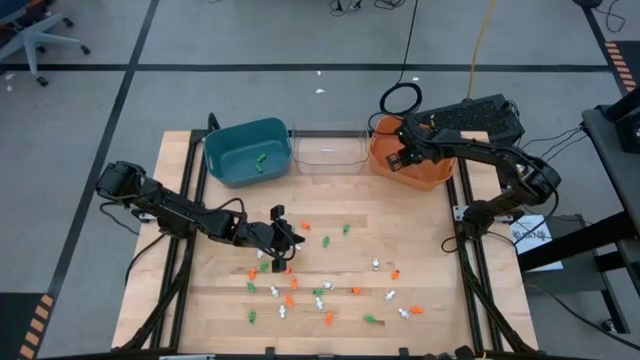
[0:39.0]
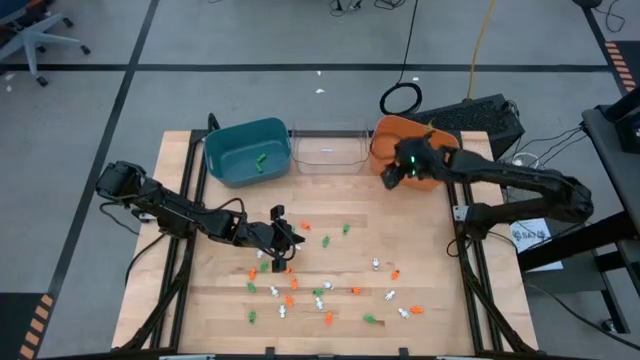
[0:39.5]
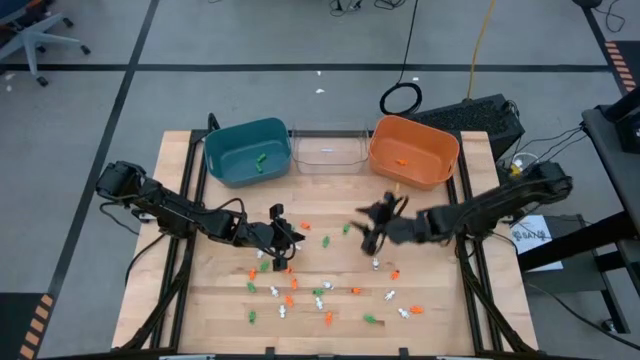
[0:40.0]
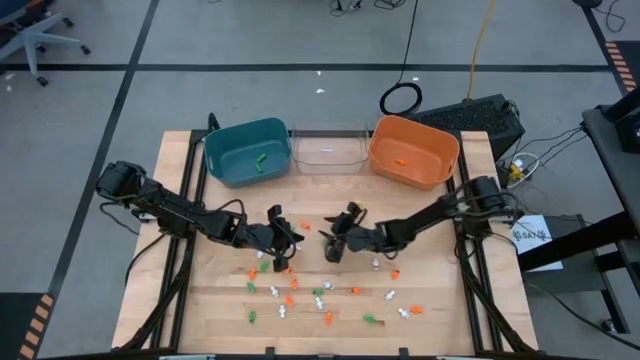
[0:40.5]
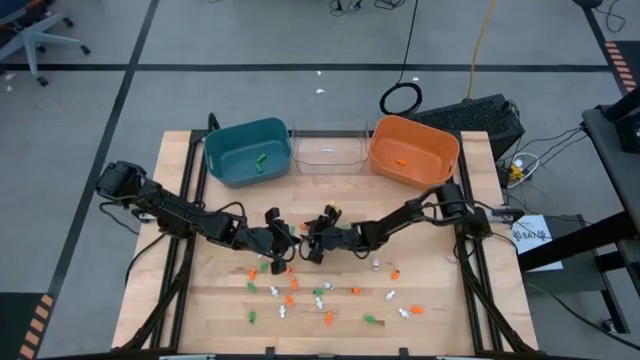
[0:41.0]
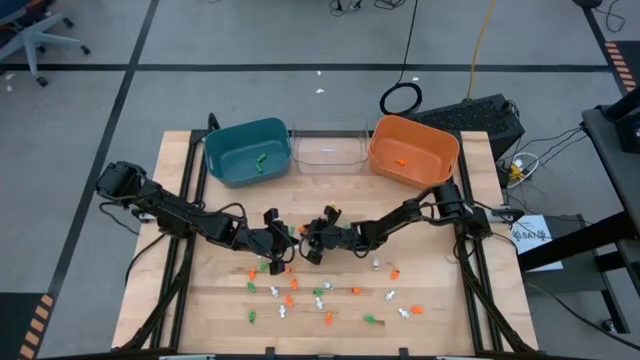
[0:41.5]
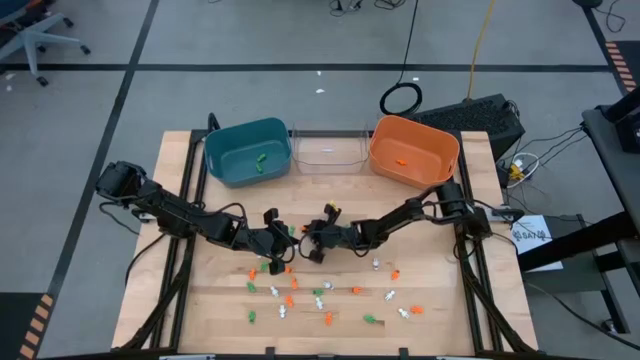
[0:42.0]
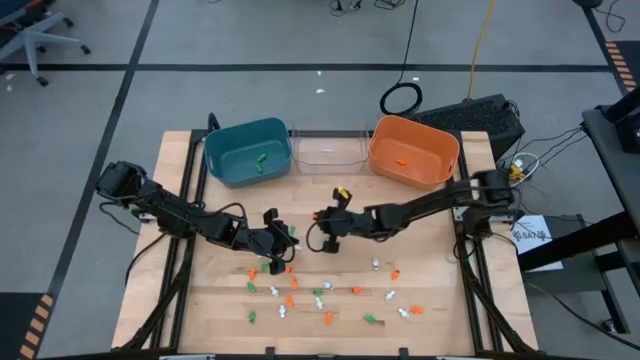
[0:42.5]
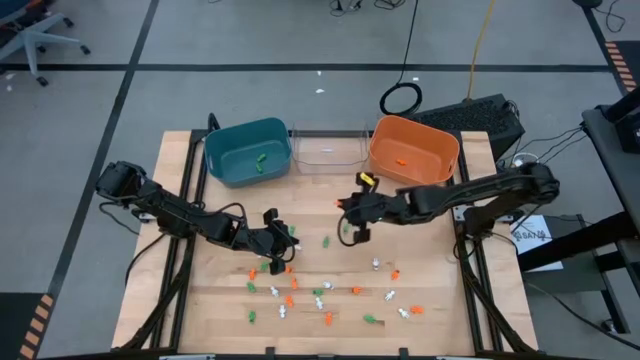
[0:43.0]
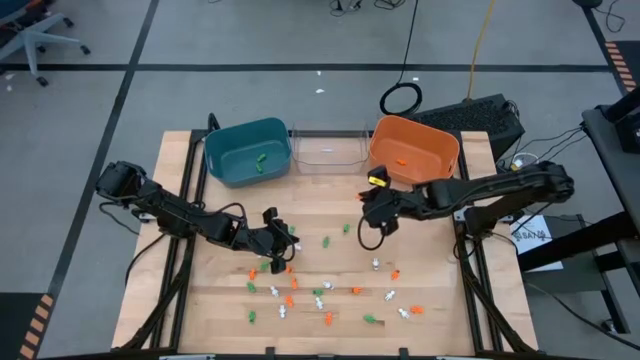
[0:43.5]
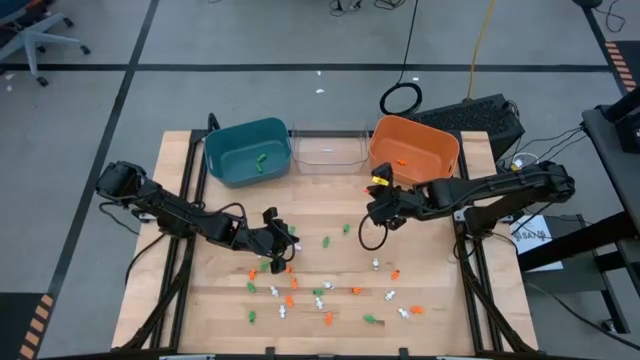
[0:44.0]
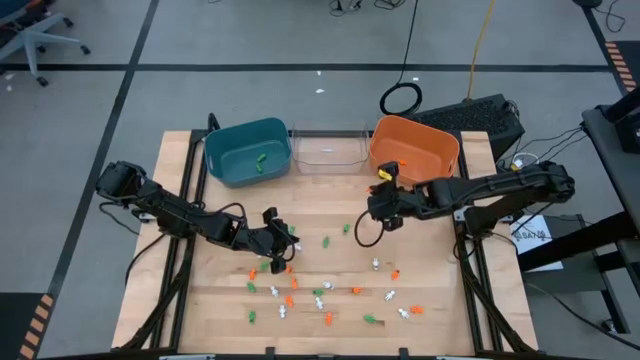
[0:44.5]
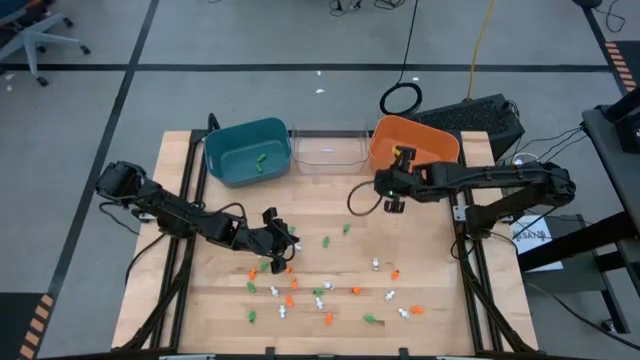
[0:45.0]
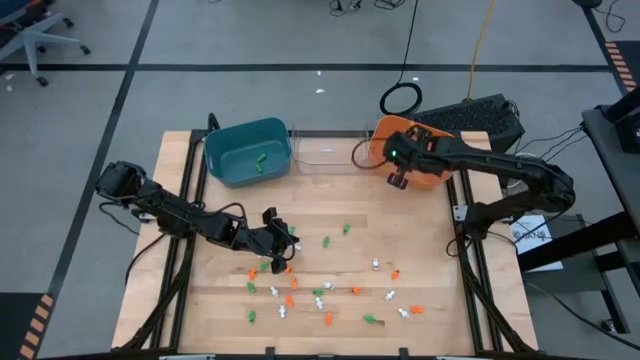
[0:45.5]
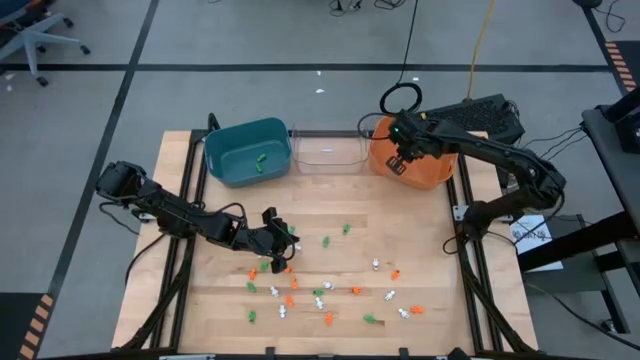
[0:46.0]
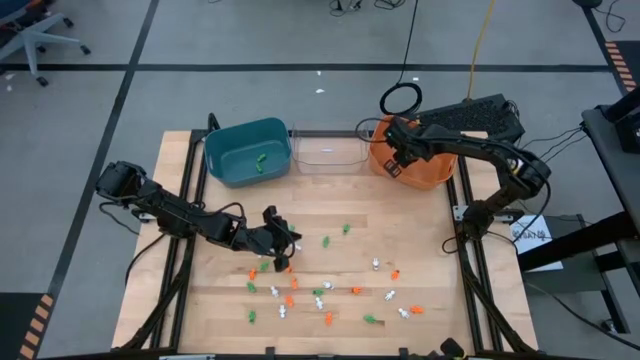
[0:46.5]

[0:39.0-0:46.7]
Task: Sort Halloween decoration
Put the orange skeleton toy into the orange bin

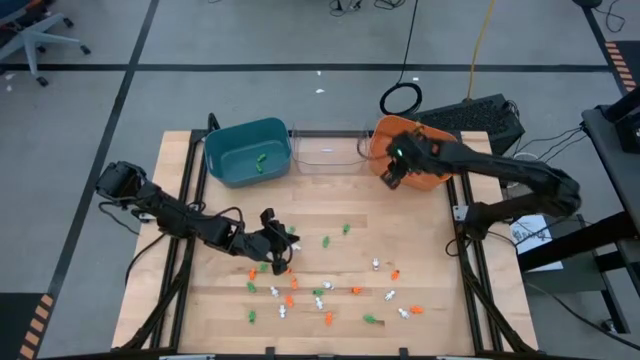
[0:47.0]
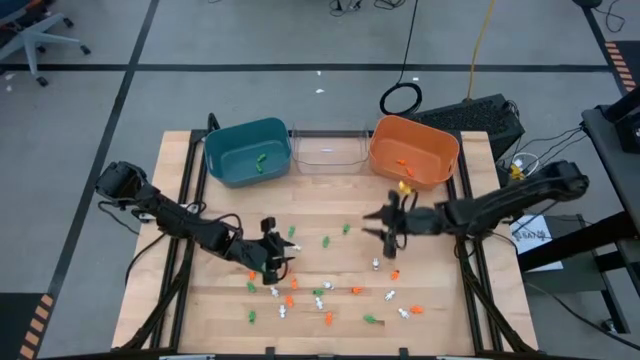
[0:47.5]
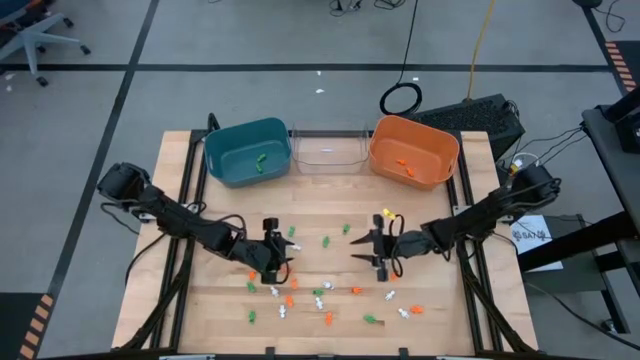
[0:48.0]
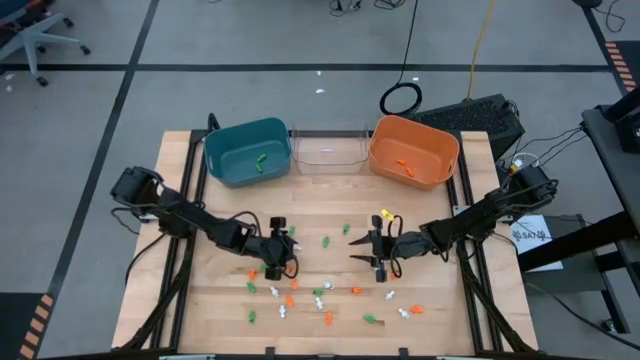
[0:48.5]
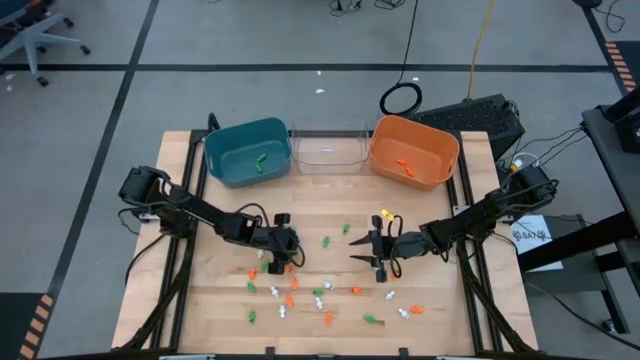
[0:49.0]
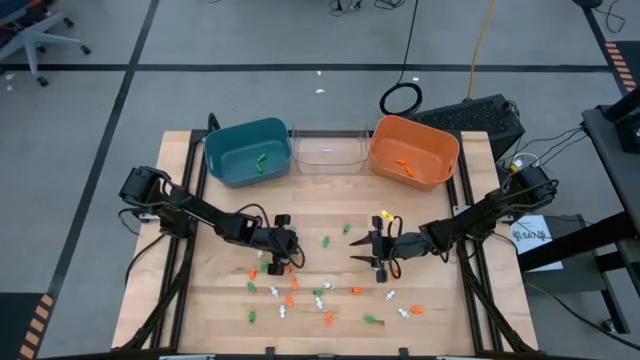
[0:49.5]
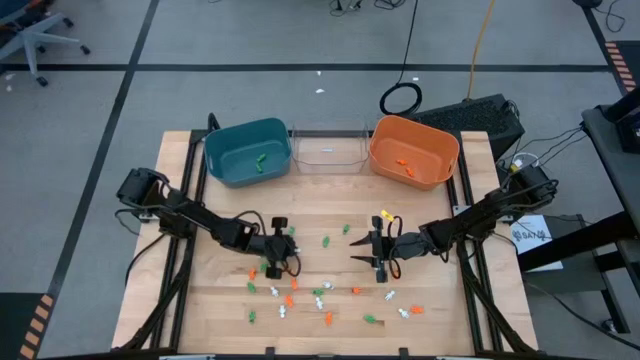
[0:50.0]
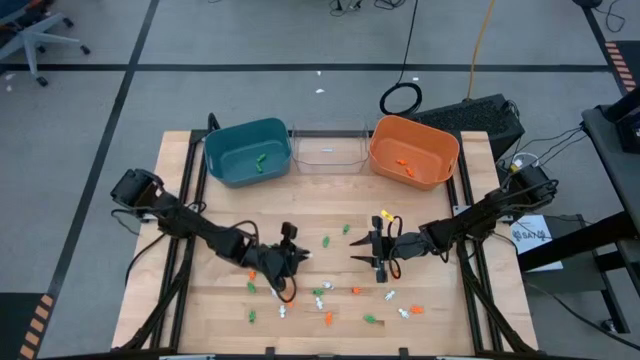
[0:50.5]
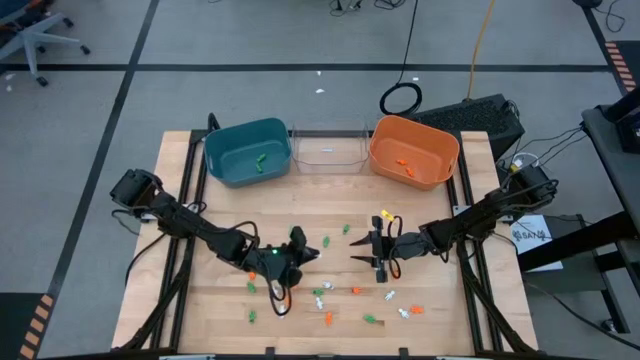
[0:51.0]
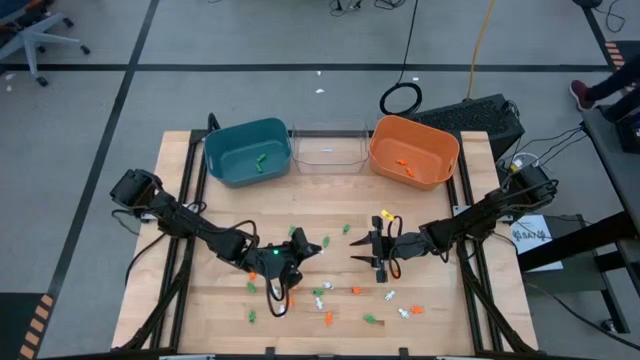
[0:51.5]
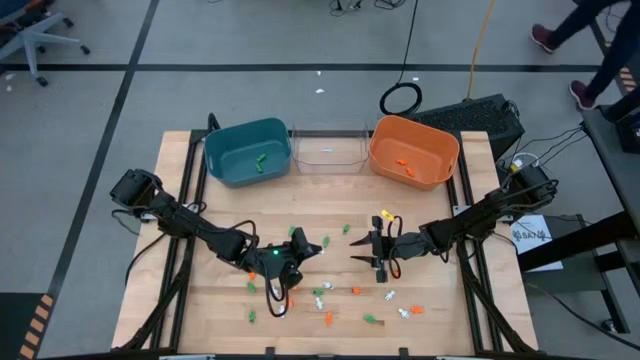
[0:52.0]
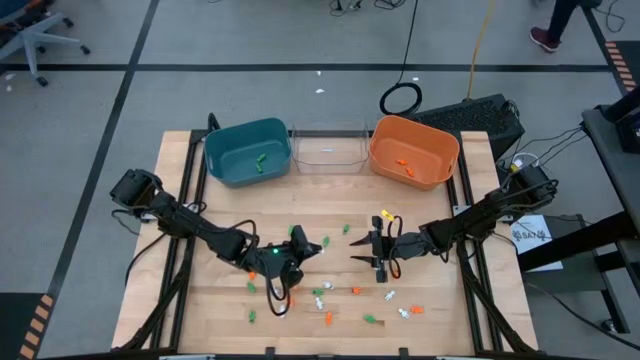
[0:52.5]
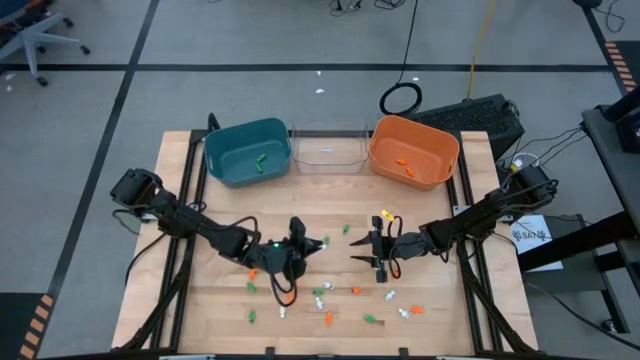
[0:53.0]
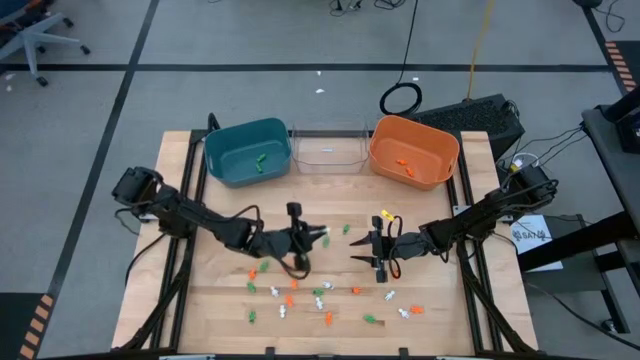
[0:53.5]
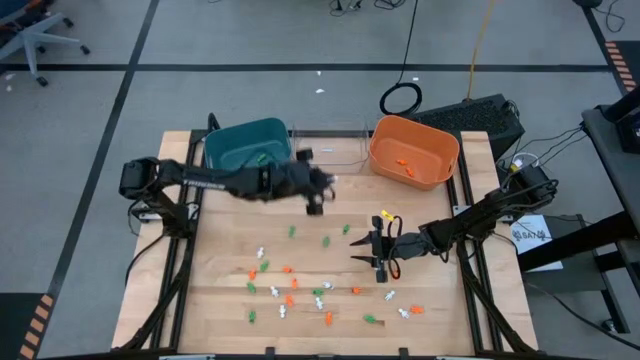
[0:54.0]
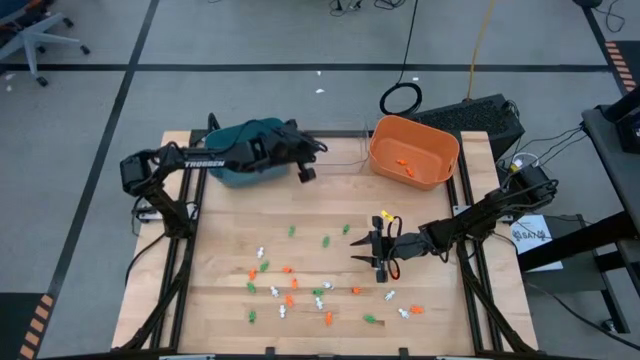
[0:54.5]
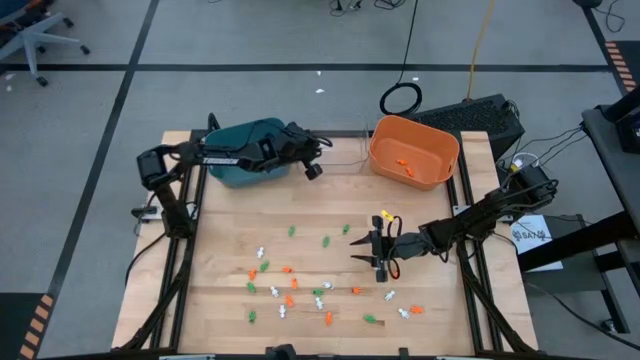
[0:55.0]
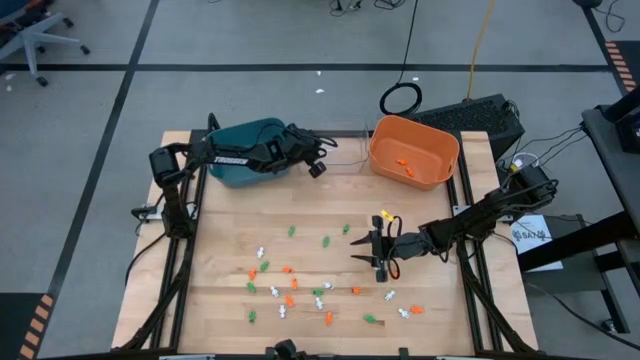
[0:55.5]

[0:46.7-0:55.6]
Put the white skeleton toy into the transparent bin

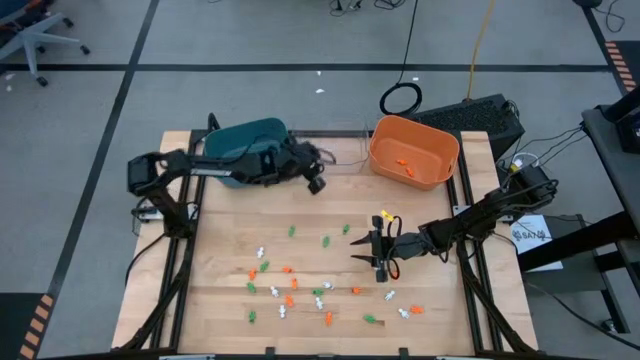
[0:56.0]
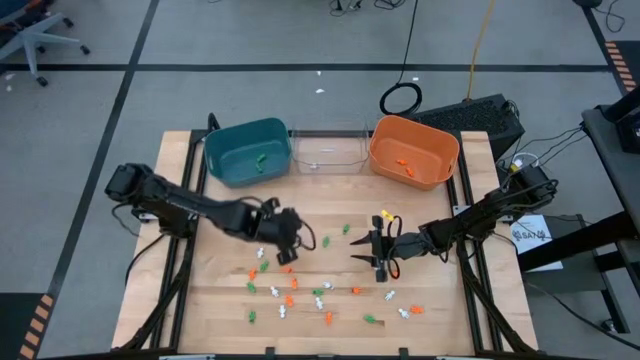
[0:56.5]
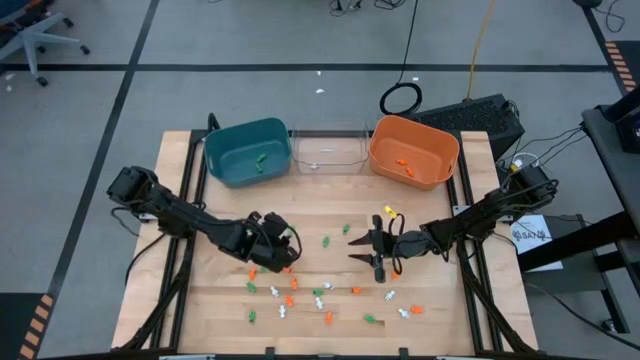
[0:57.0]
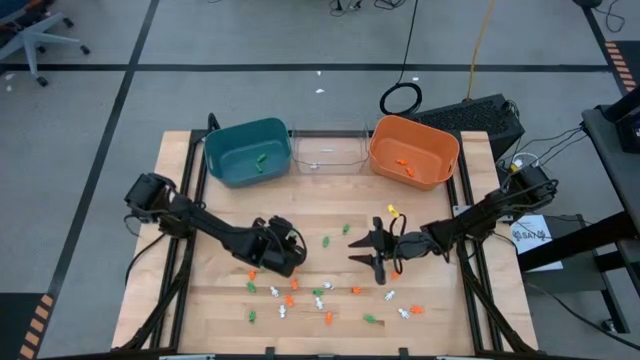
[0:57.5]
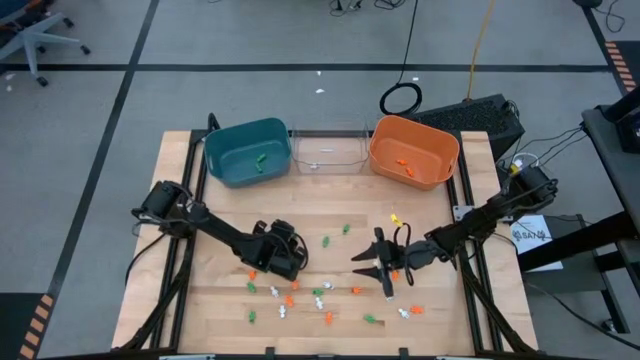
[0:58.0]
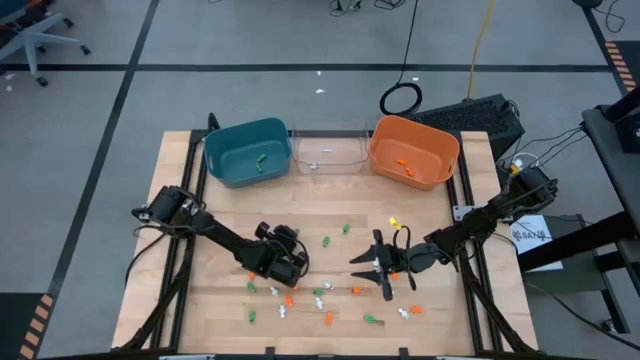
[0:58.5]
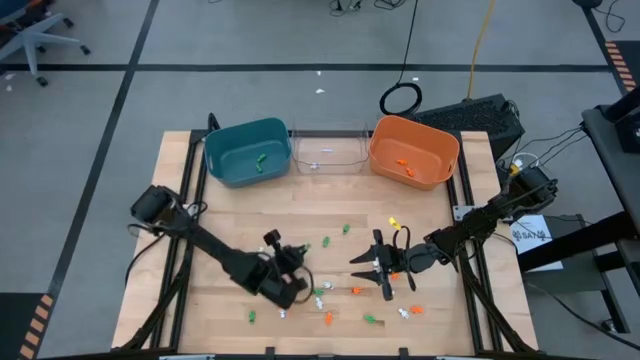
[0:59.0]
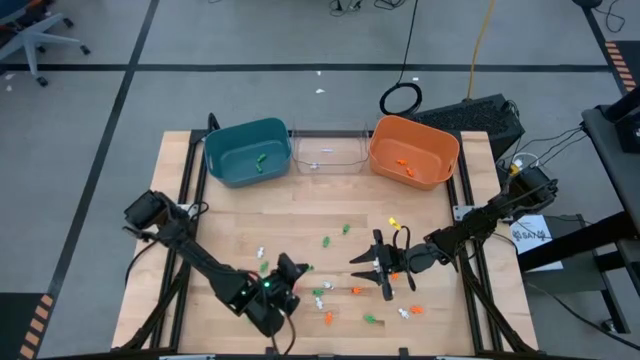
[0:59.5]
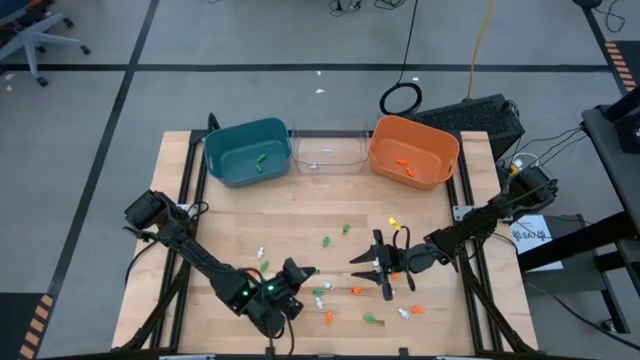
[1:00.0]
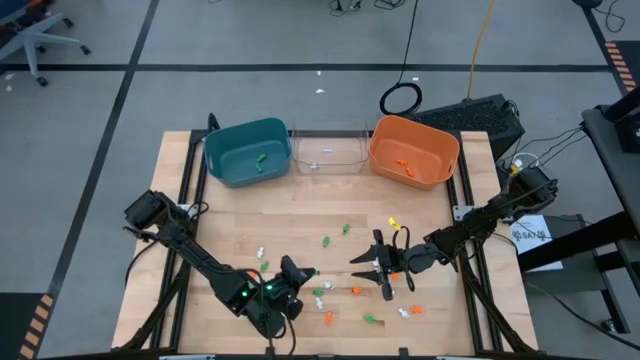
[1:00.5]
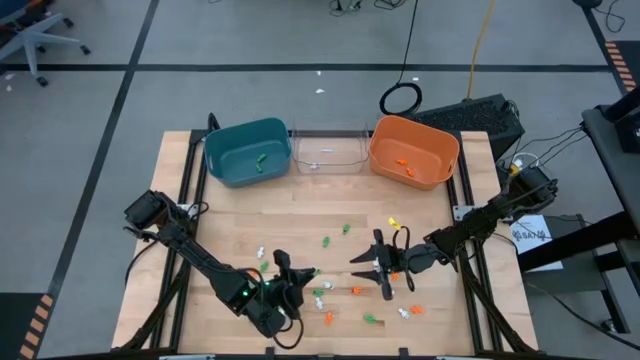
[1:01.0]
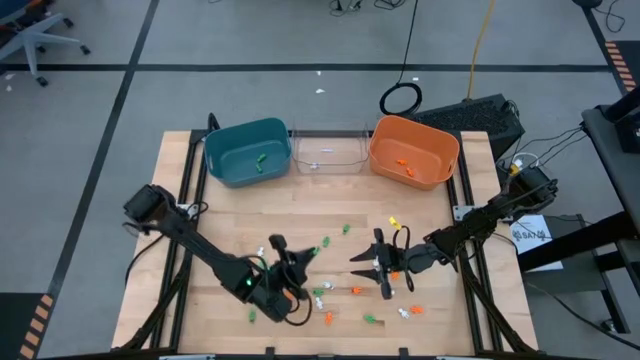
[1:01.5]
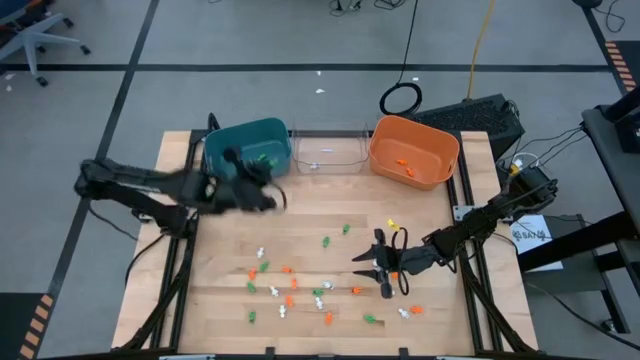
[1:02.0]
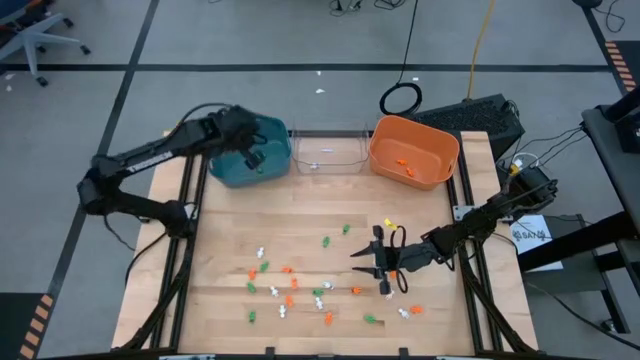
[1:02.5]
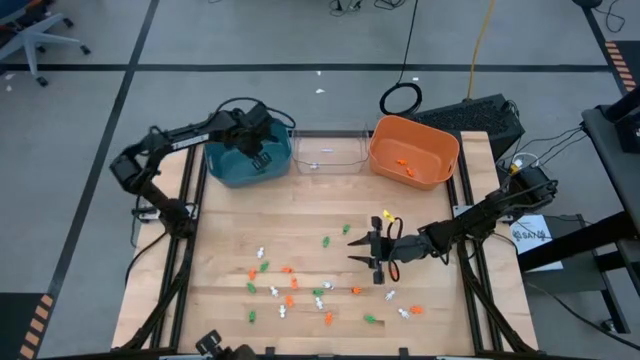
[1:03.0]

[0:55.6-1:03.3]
Put the green skeleton toy into the blue bin
